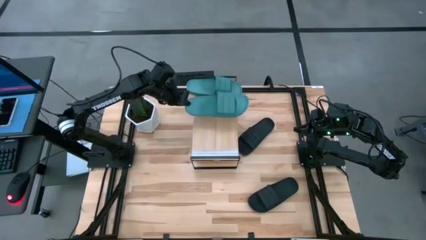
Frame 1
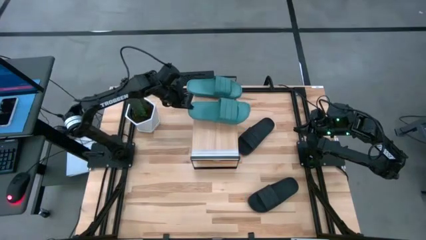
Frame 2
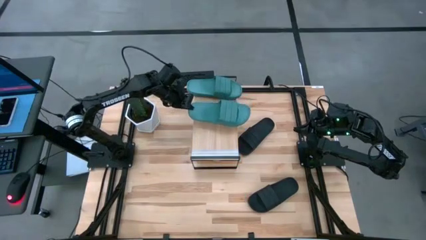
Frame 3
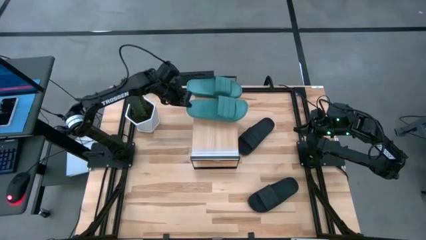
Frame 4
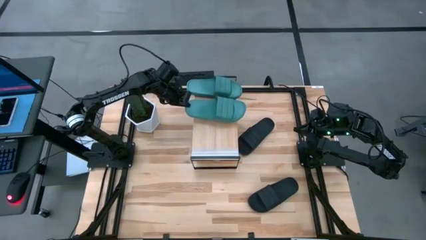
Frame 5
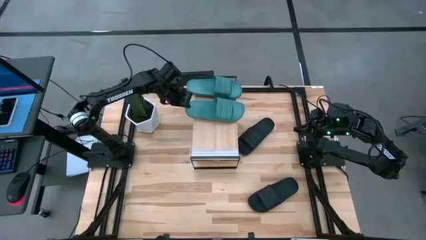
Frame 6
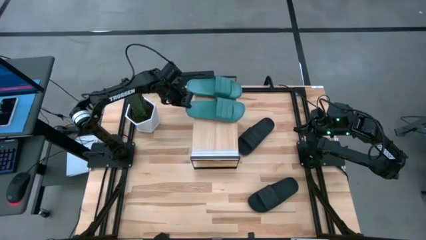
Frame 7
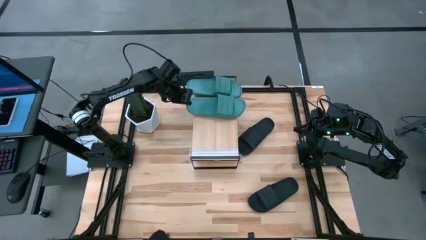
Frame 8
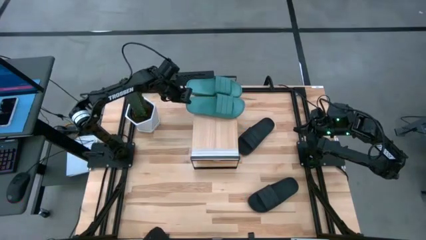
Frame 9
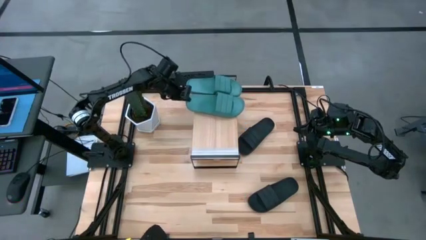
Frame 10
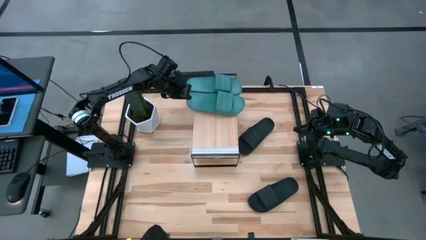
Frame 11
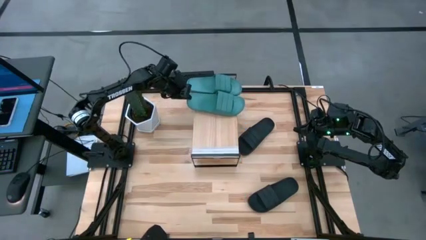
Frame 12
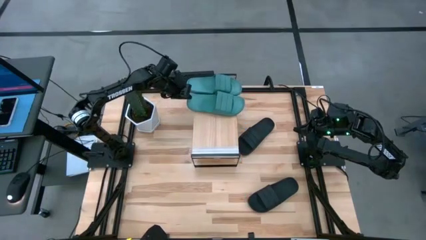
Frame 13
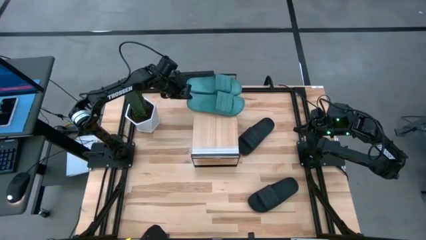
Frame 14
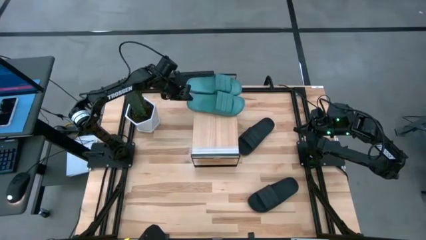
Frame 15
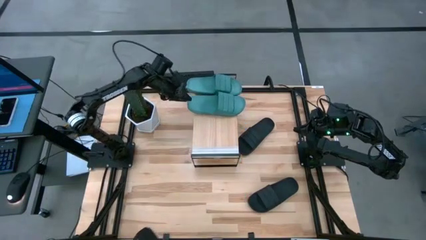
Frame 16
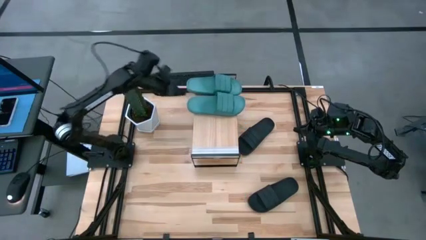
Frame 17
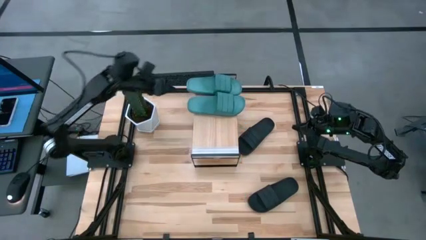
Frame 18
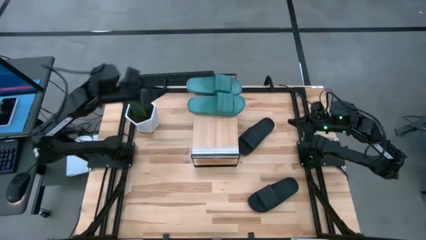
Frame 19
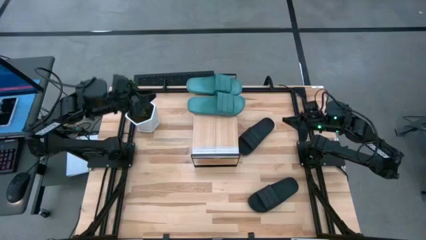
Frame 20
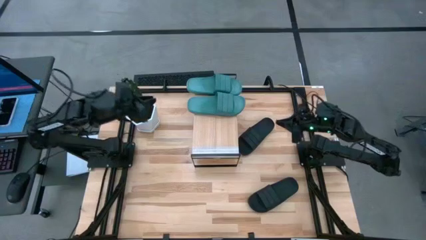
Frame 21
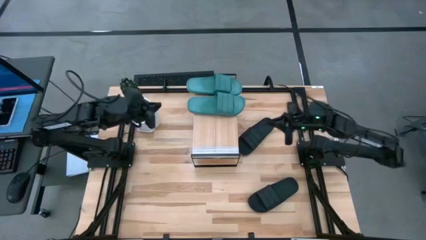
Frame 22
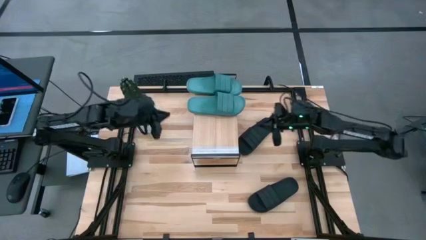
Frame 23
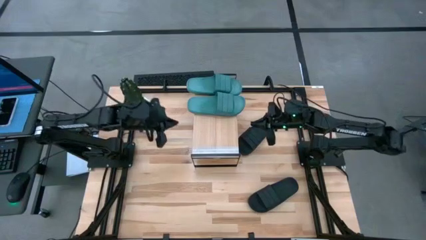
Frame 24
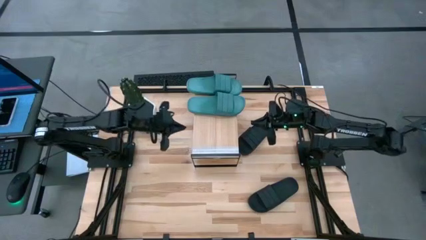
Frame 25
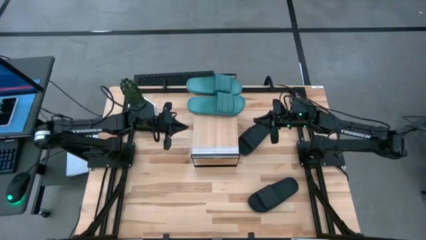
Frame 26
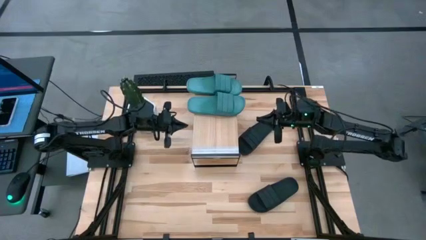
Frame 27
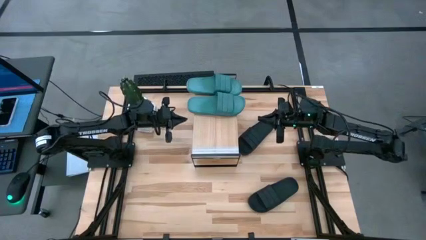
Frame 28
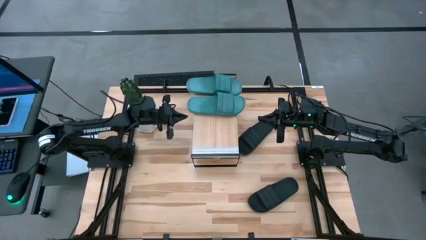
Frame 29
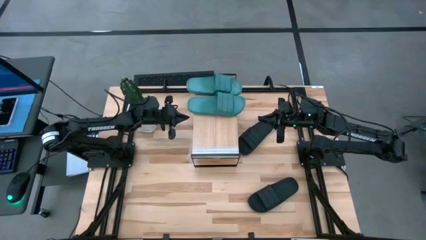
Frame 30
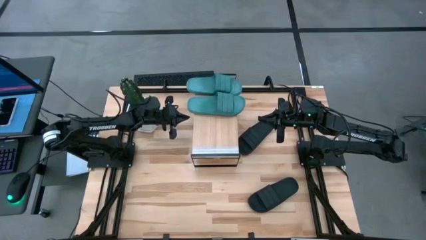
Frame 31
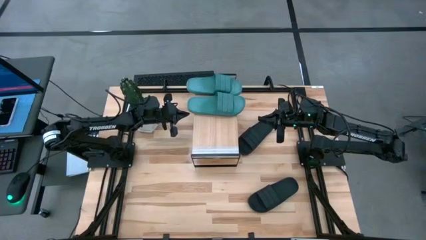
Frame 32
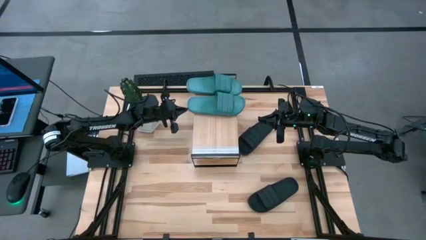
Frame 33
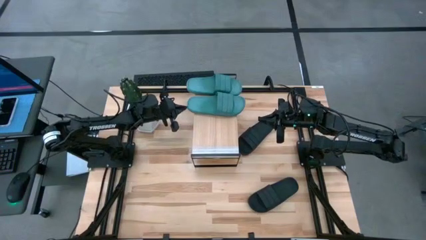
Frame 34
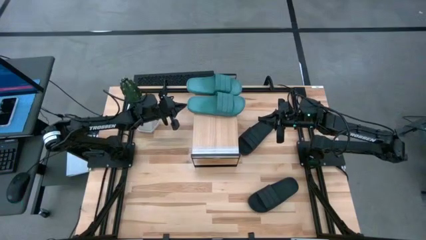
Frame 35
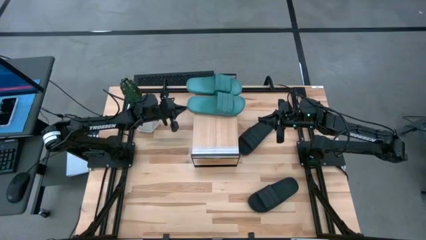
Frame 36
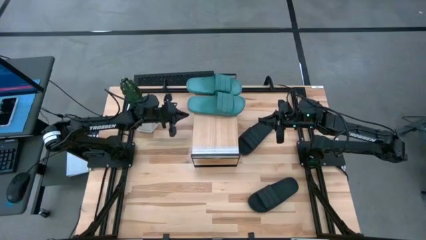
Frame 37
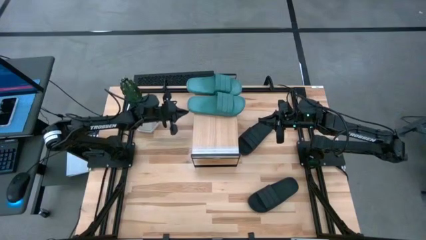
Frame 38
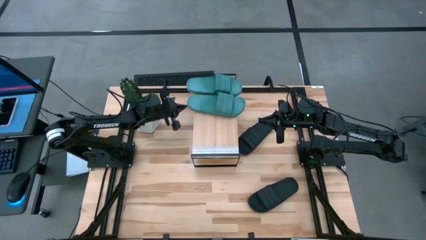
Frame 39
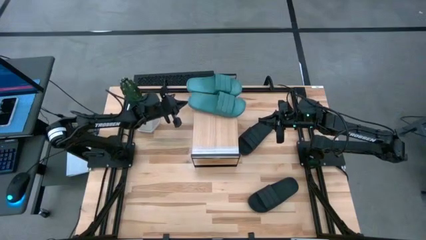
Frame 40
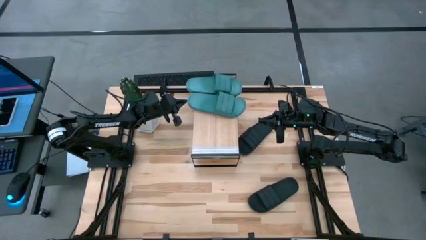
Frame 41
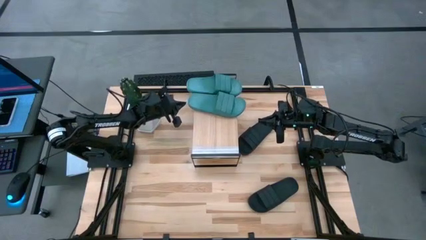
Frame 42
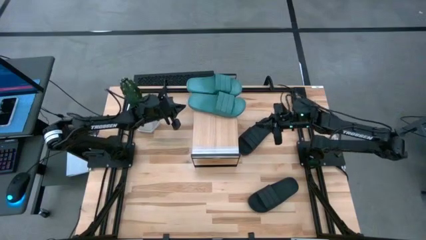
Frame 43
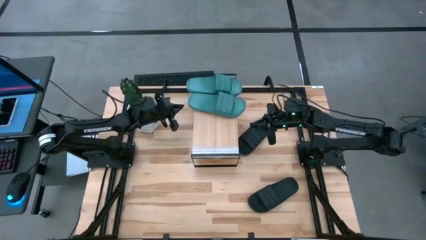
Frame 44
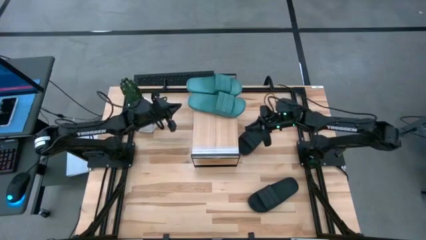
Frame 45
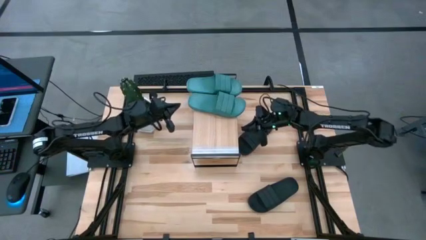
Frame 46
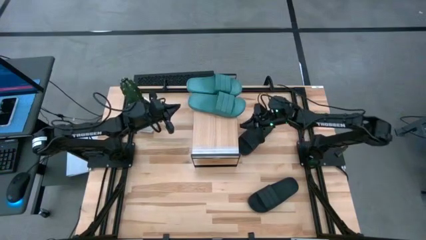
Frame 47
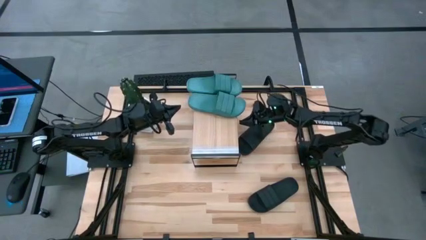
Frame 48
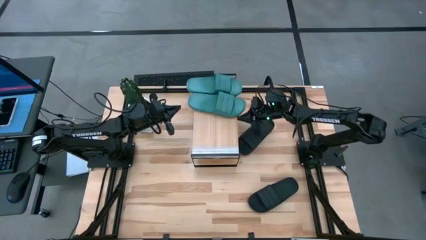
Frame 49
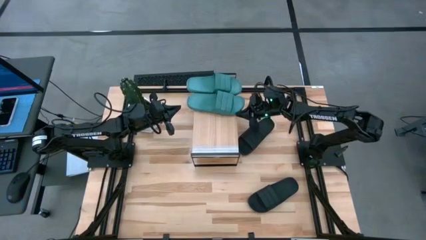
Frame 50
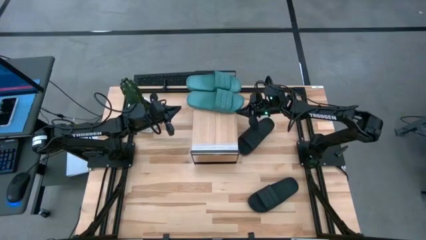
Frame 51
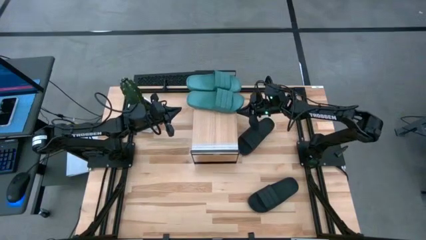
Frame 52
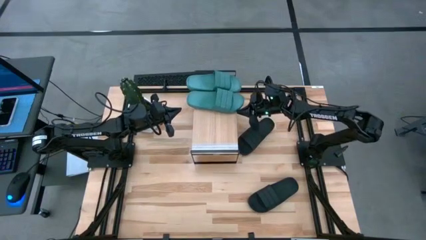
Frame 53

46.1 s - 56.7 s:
Task: Pick and place slides into the shelf
Put the green slide on the shelf

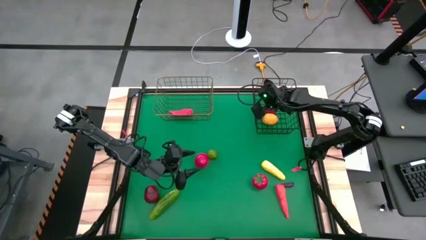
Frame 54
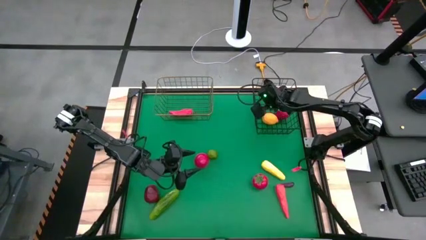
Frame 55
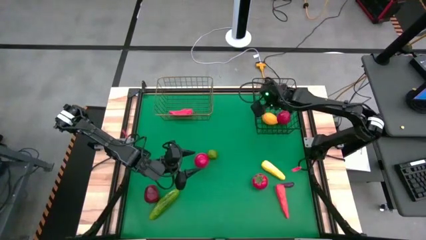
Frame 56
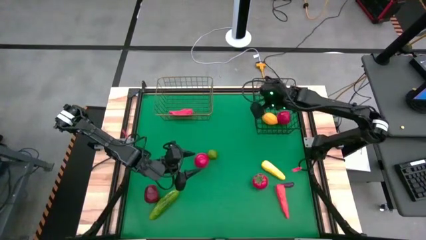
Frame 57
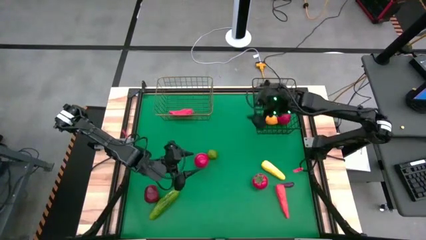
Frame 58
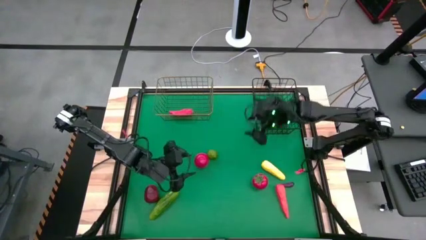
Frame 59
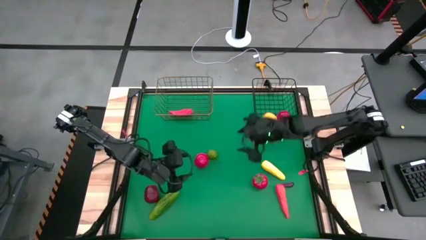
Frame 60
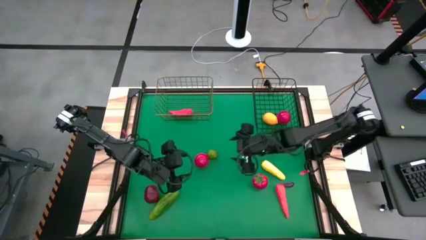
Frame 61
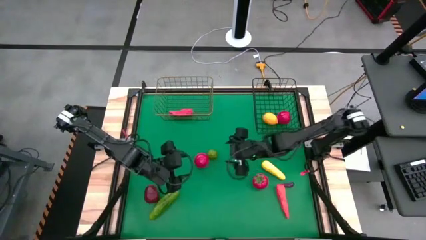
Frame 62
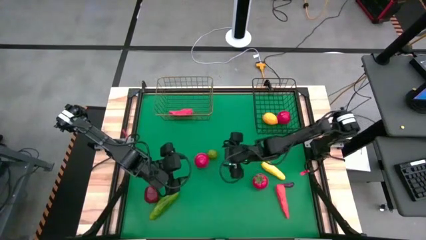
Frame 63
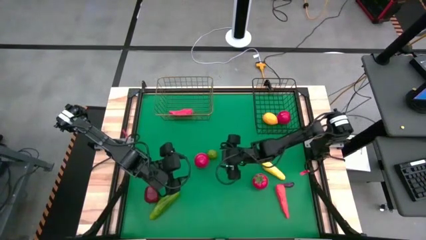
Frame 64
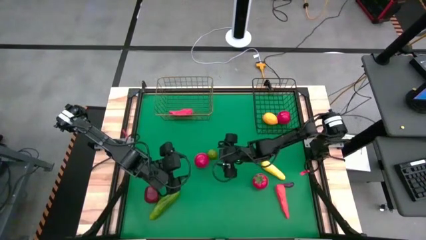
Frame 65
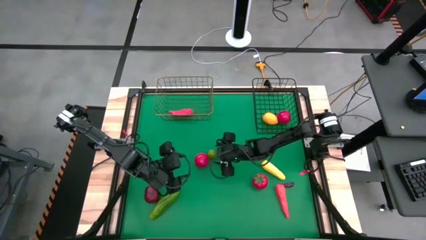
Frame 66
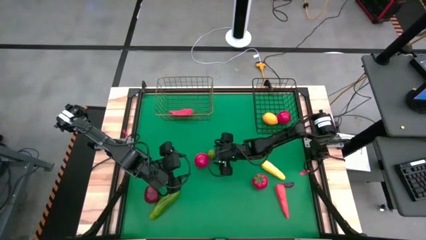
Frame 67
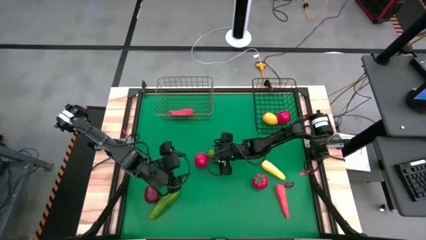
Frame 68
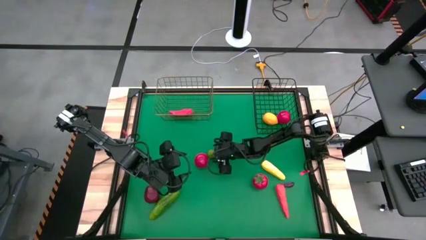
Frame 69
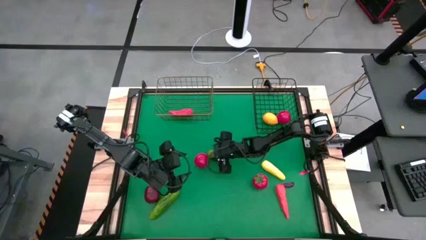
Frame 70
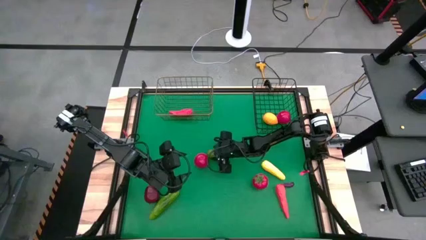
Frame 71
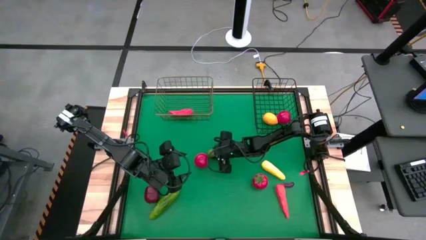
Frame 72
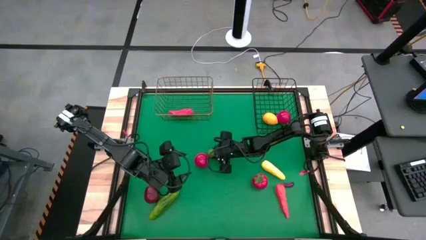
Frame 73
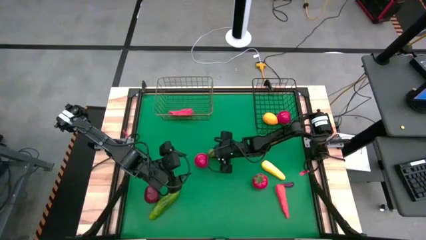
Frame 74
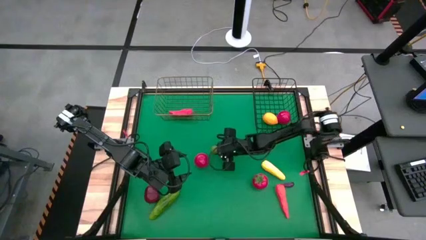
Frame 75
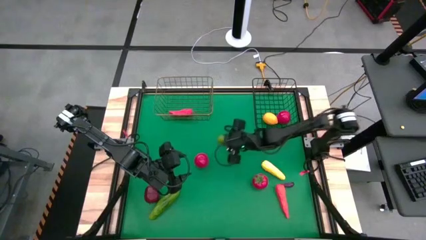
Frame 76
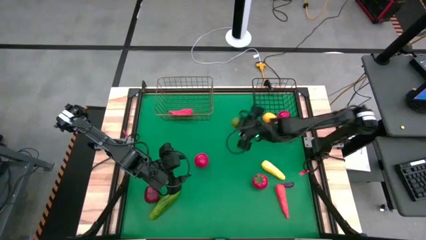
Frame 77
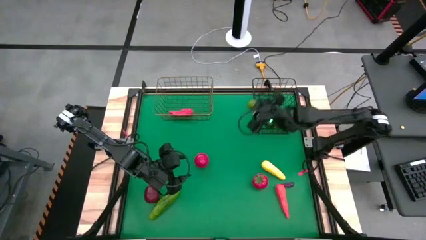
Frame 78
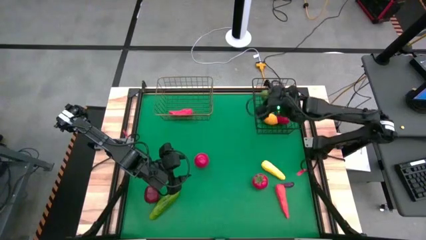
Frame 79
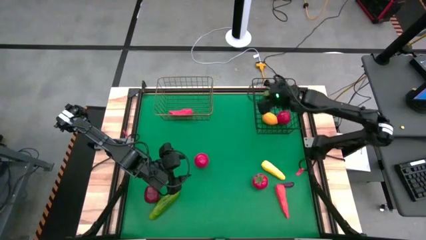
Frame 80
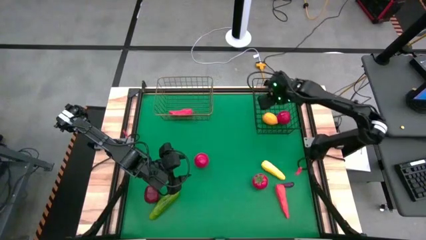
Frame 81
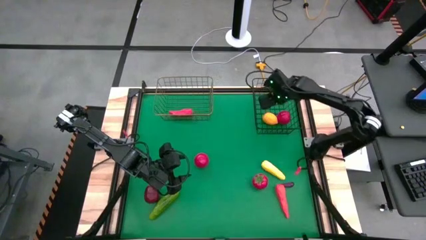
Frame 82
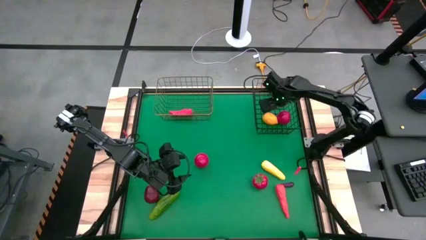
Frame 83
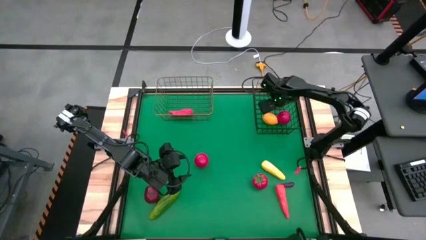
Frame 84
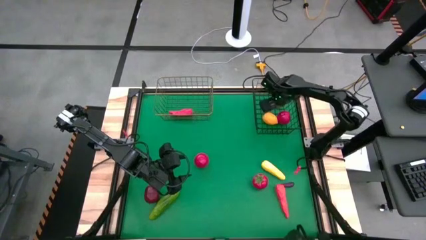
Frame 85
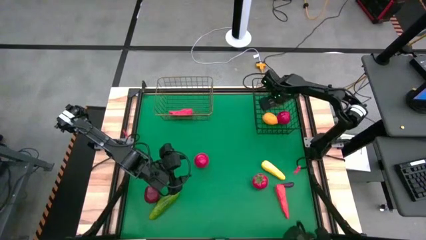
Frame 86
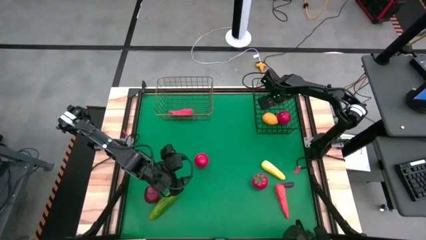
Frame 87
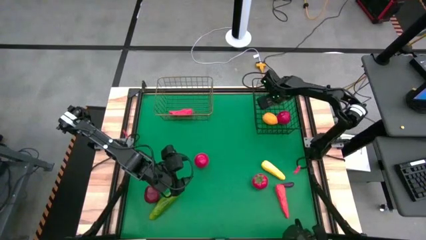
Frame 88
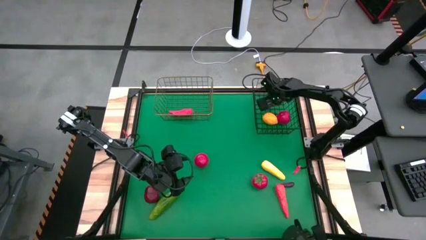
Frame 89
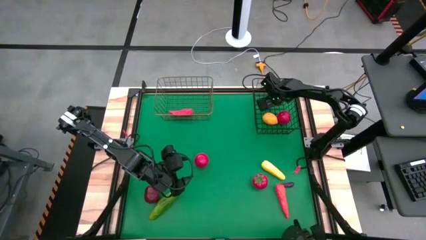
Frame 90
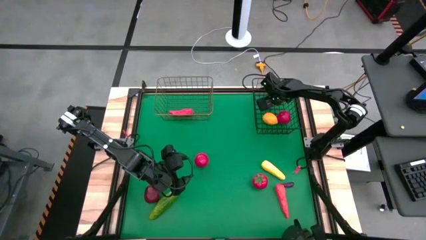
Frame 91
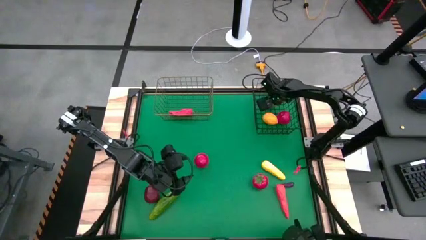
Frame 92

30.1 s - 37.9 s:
Task: Sort produce into baskets
Put the lime into the black wire basket
